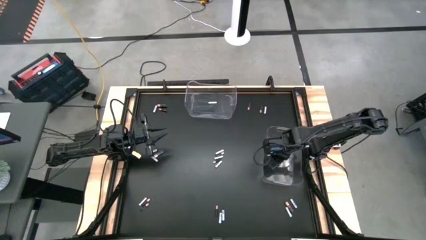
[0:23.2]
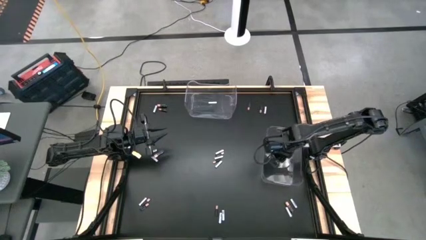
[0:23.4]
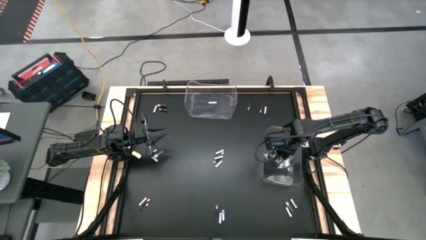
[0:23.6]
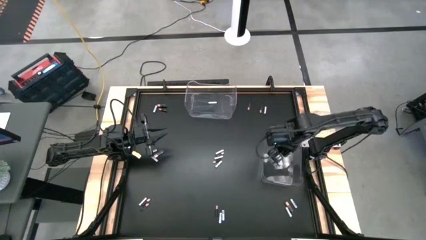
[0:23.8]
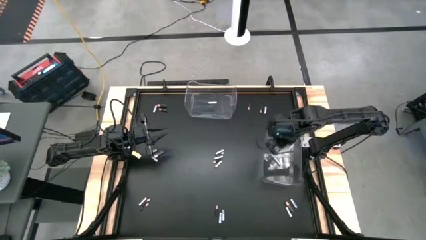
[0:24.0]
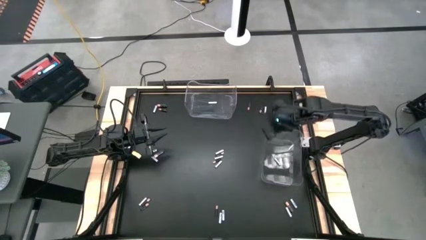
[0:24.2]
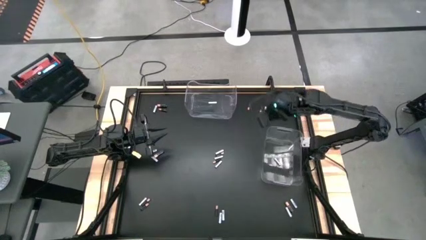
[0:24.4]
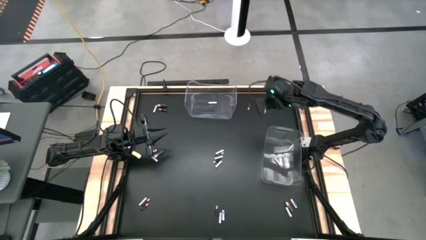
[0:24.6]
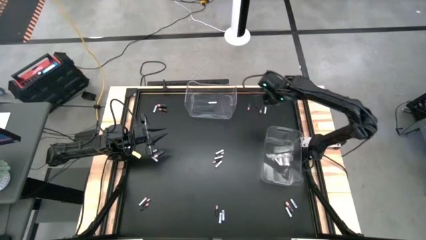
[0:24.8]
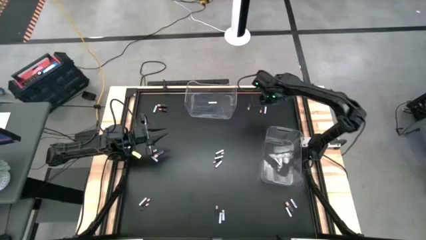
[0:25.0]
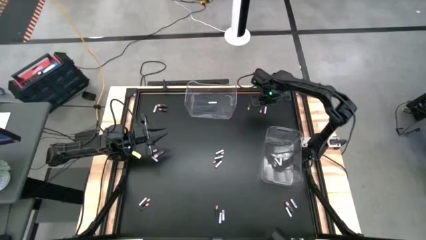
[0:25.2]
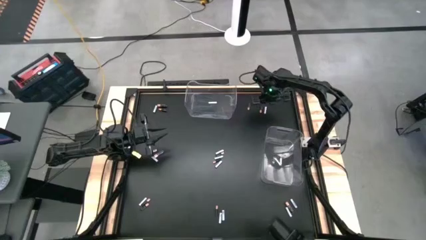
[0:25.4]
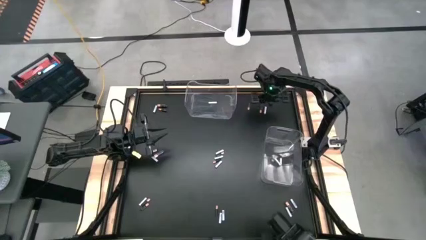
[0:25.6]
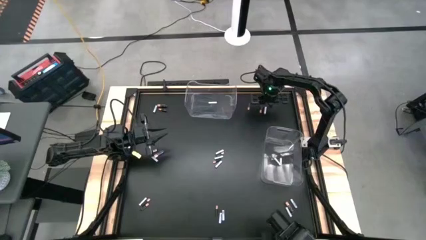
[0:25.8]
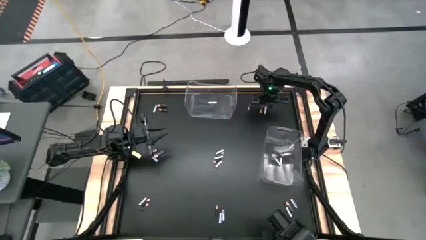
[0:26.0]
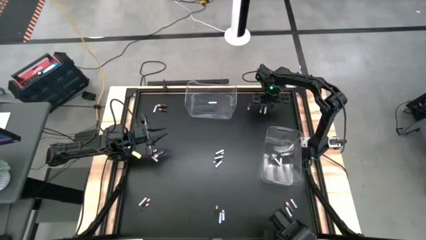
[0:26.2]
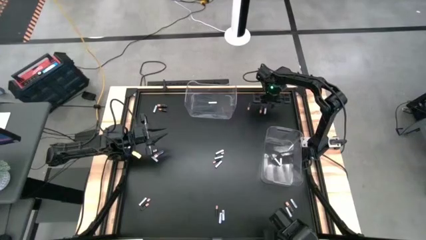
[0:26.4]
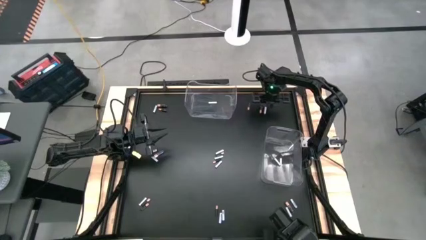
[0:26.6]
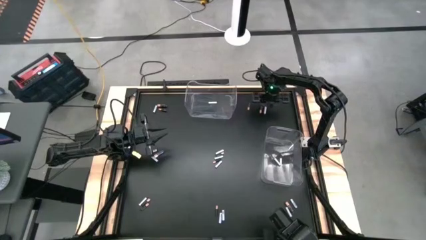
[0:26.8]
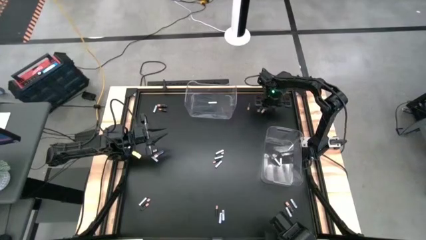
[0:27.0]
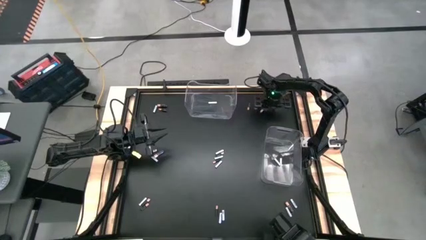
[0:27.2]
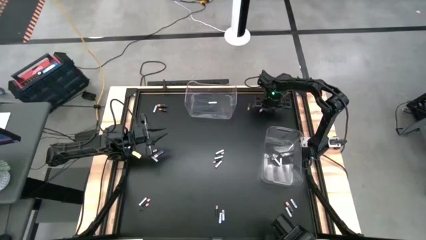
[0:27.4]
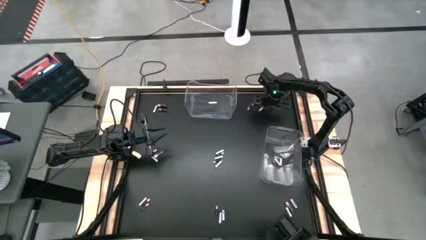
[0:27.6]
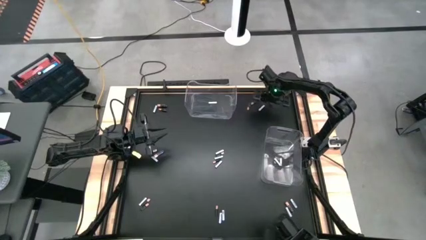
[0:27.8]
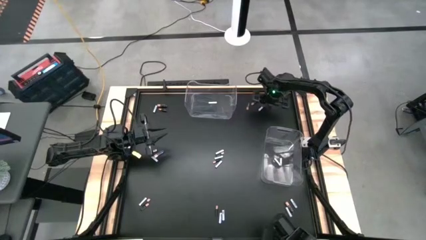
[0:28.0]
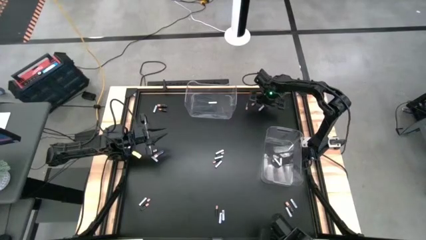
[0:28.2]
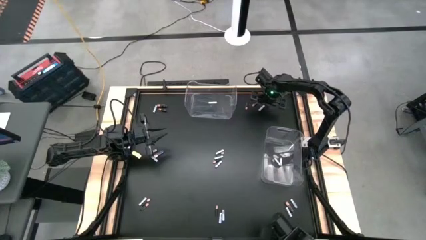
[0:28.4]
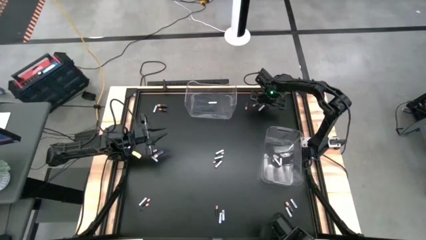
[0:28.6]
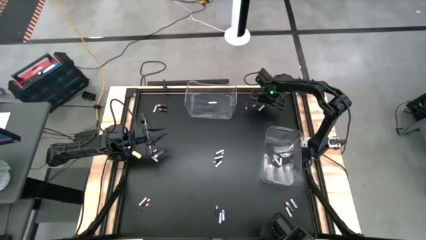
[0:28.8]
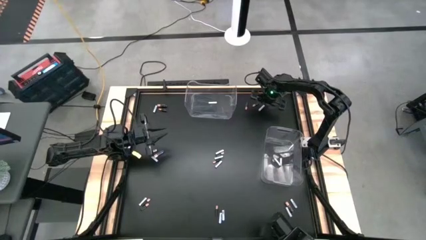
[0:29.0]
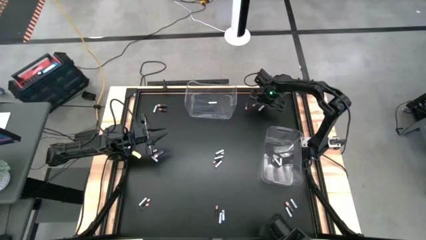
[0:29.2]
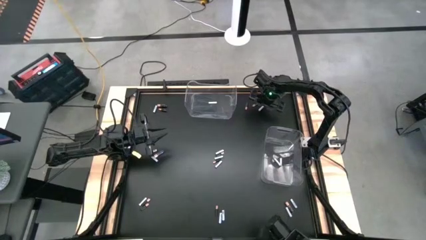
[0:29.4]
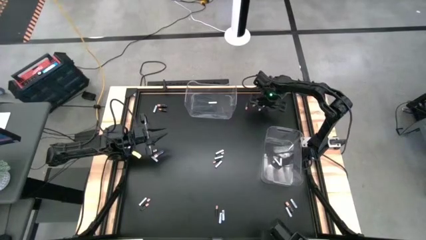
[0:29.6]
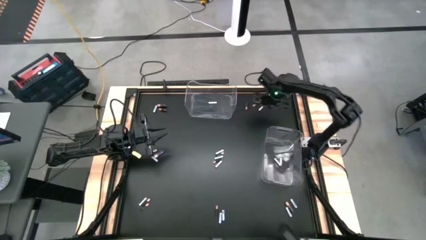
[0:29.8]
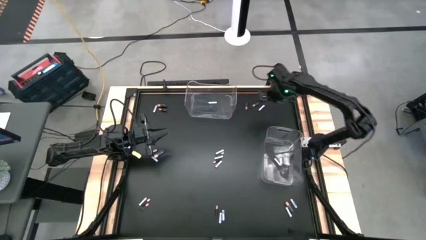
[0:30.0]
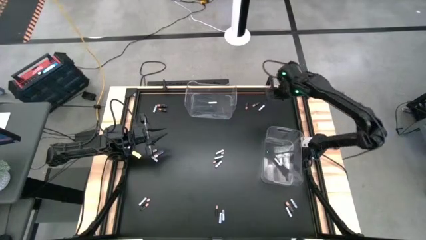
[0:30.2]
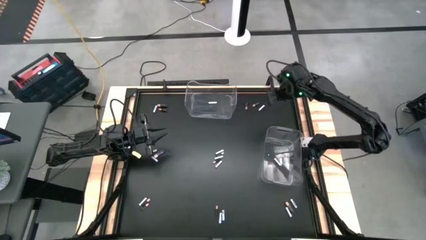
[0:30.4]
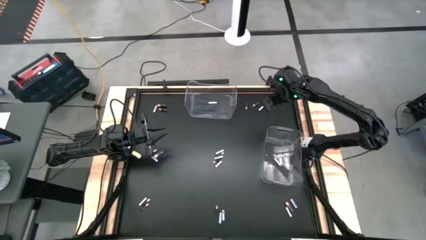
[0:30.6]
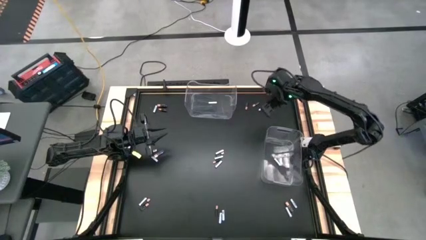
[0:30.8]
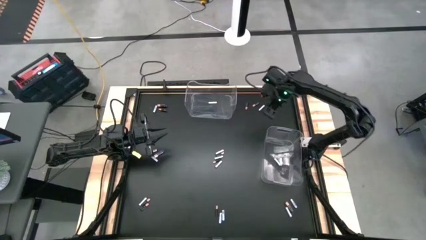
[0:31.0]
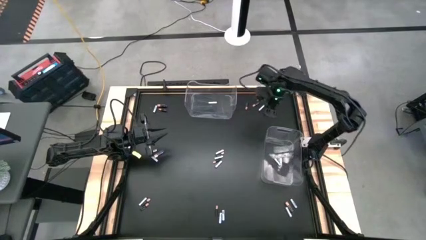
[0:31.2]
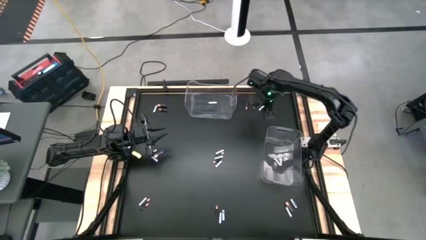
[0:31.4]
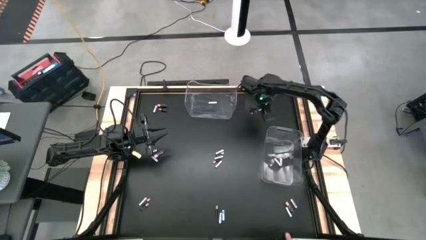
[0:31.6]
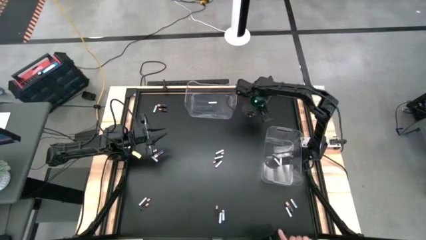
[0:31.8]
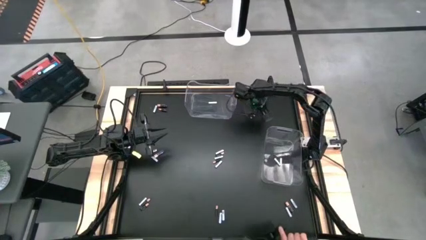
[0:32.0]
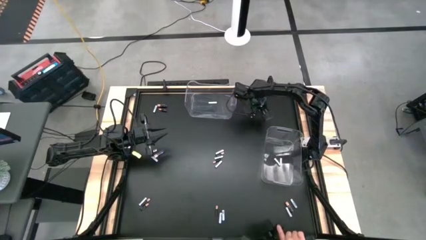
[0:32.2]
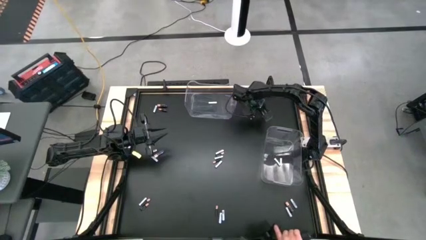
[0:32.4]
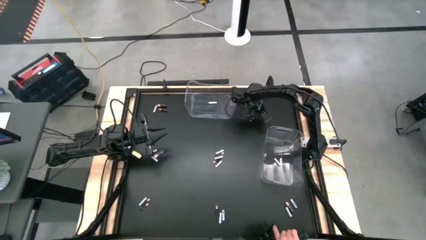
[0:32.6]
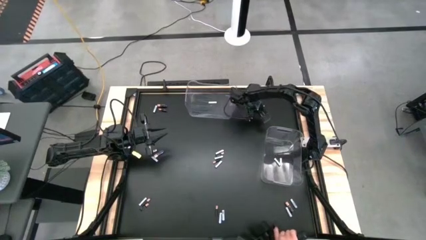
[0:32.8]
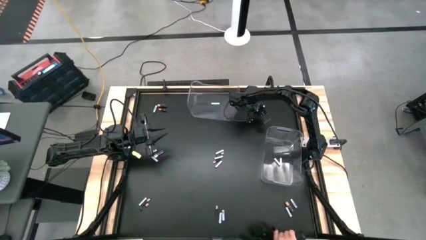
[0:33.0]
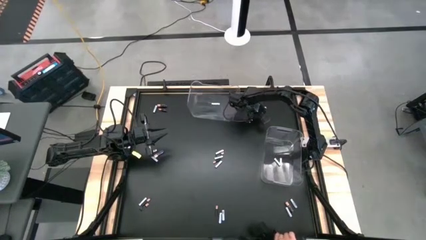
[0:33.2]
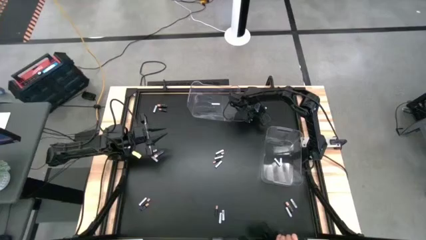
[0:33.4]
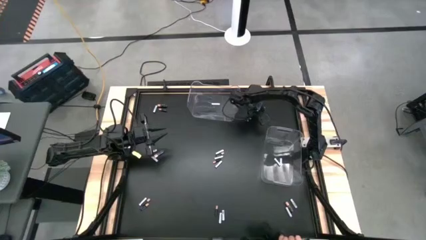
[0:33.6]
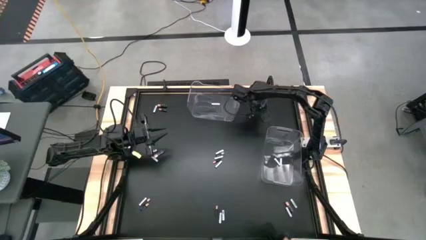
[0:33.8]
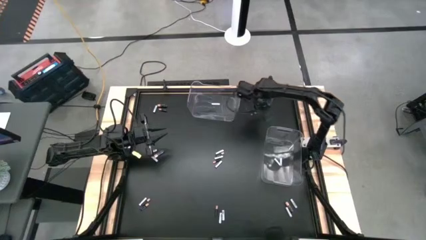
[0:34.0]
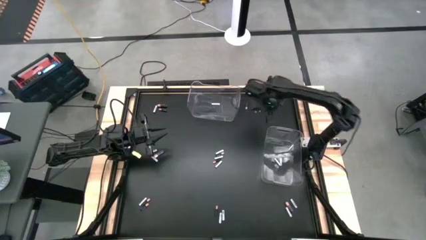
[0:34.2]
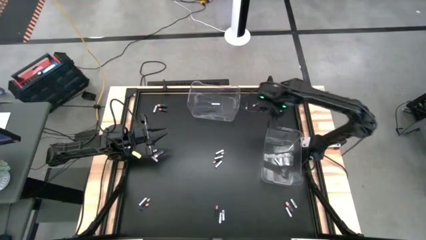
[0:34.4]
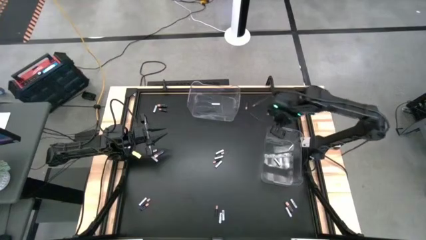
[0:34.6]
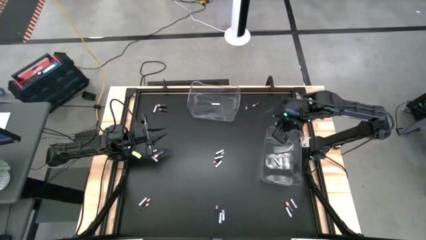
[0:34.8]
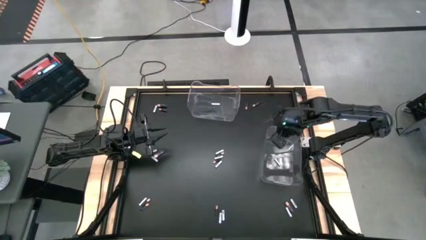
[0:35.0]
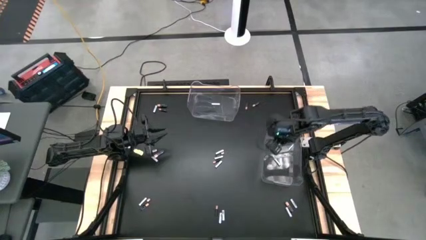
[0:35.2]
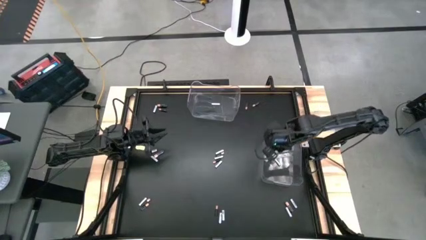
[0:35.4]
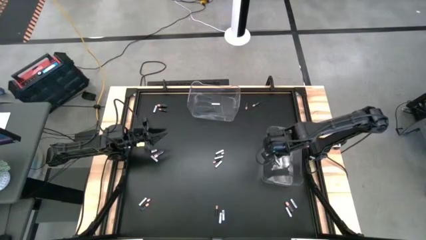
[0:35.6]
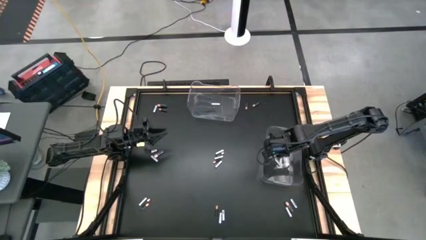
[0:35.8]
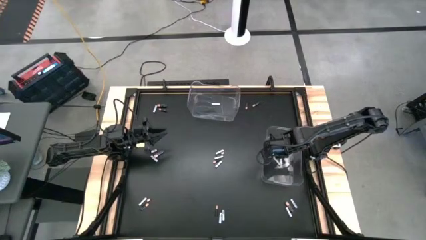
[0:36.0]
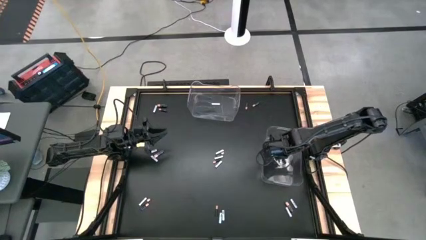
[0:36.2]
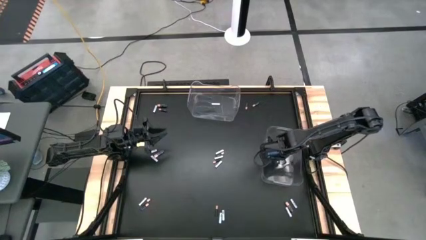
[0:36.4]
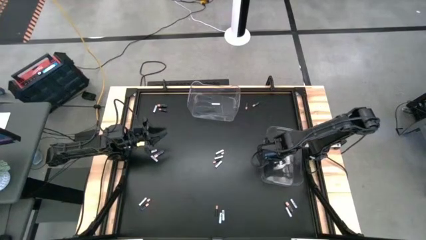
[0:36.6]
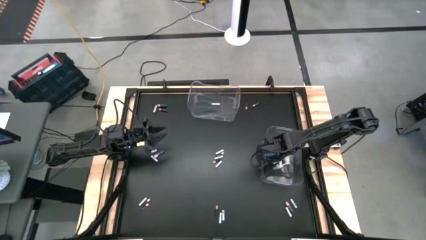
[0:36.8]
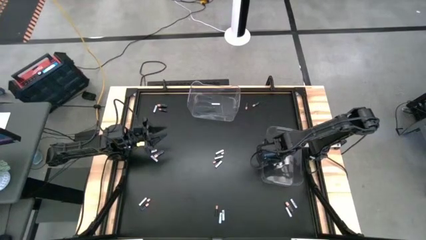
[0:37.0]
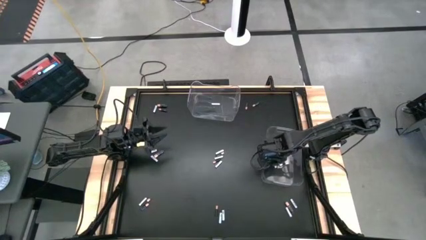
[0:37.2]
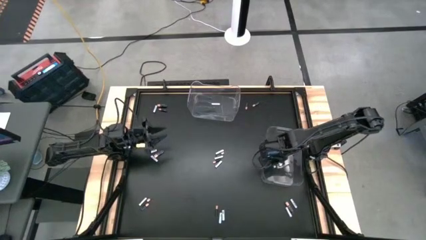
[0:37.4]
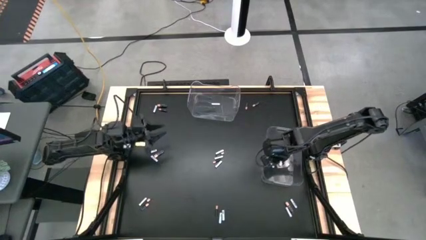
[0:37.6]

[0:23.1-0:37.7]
Task: Sort batteries
Put the white battery into the right transparent bin

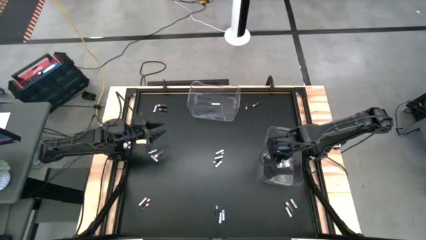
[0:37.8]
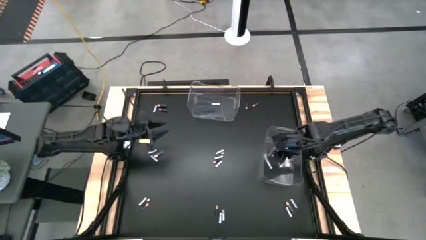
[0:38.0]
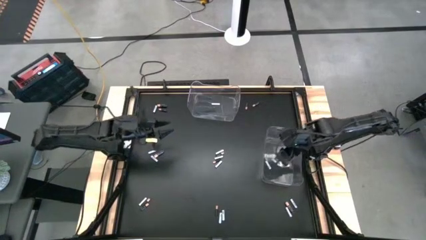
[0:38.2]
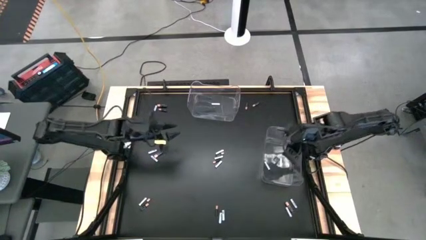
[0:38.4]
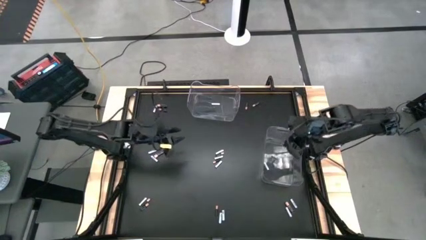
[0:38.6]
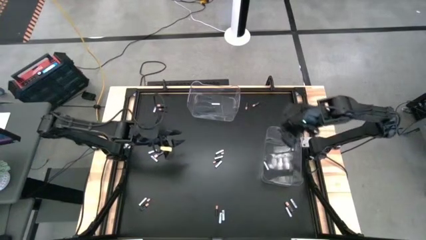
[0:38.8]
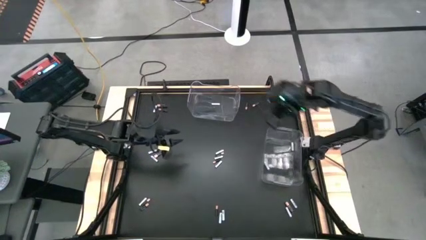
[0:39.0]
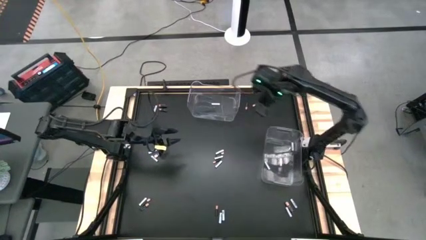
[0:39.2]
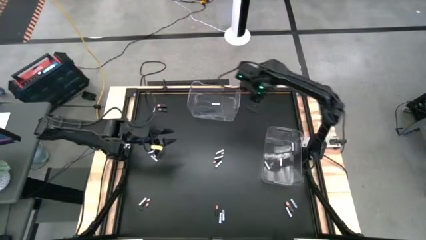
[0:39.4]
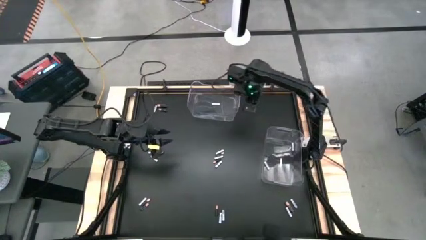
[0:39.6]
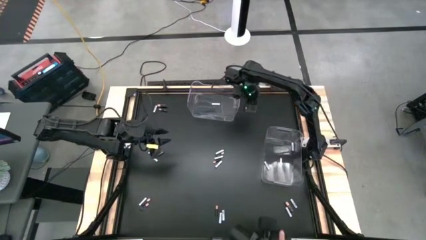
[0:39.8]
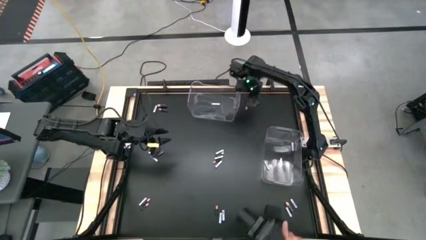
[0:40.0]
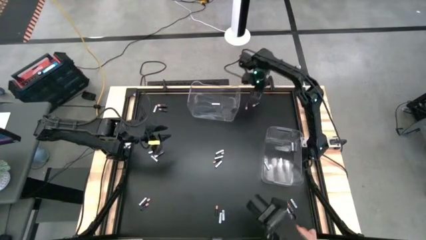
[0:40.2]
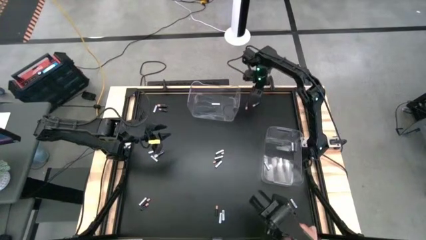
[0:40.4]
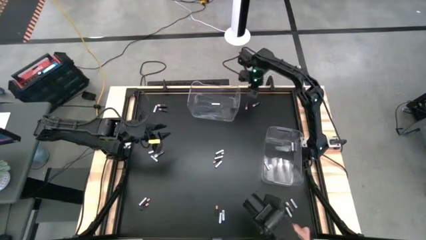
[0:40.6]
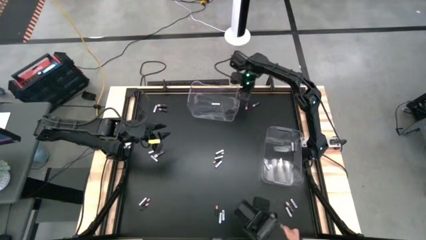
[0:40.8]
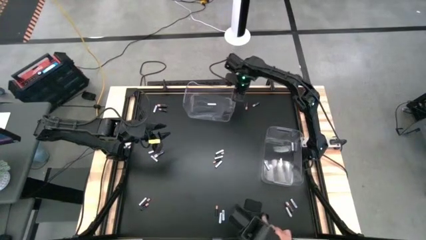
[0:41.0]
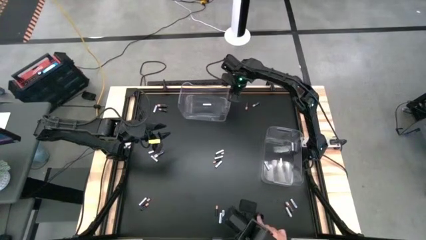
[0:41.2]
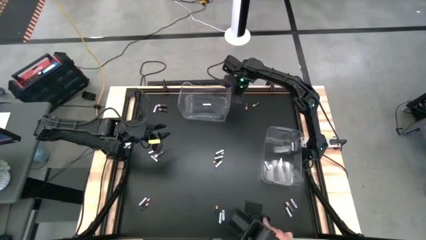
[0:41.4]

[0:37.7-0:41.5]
Adjust the top transparent bin
